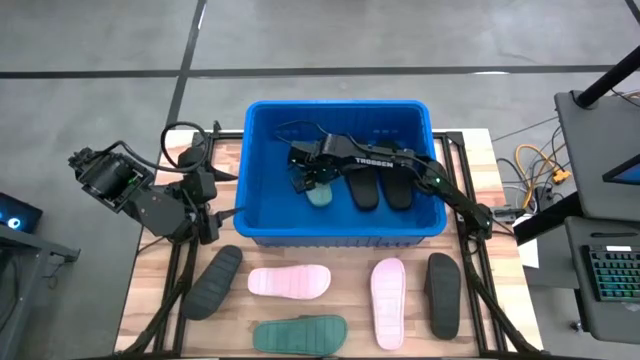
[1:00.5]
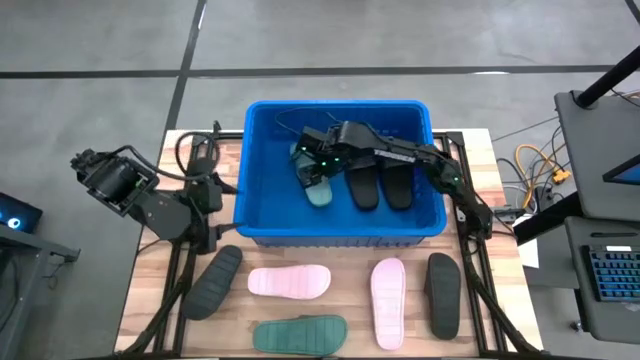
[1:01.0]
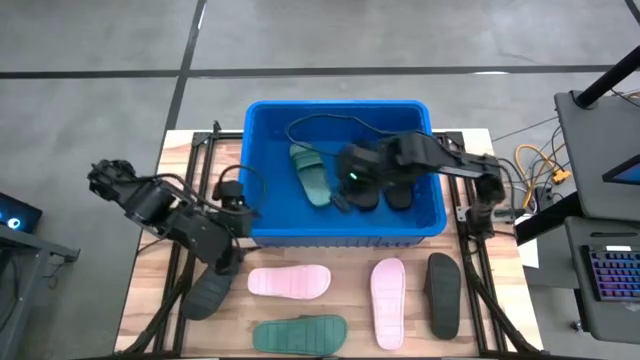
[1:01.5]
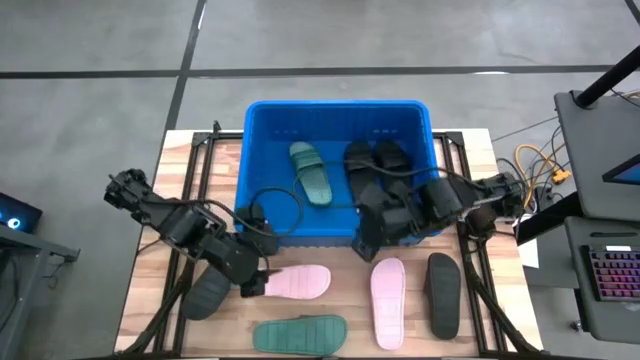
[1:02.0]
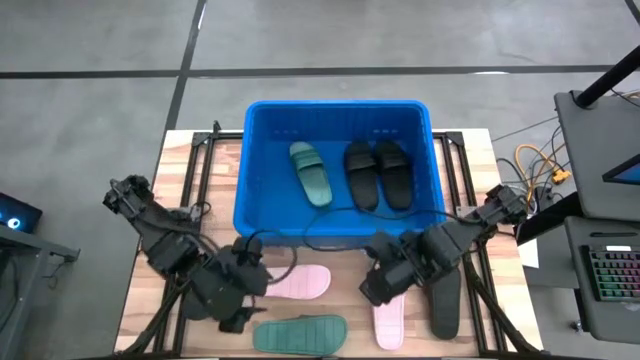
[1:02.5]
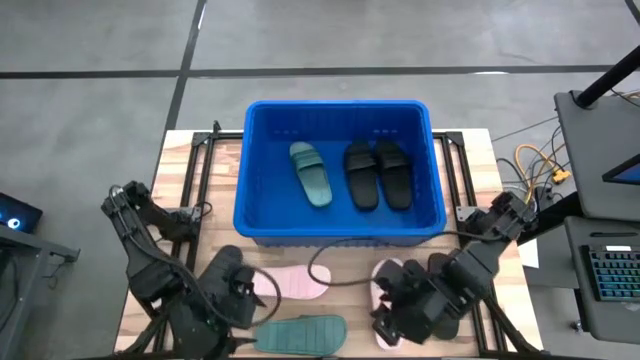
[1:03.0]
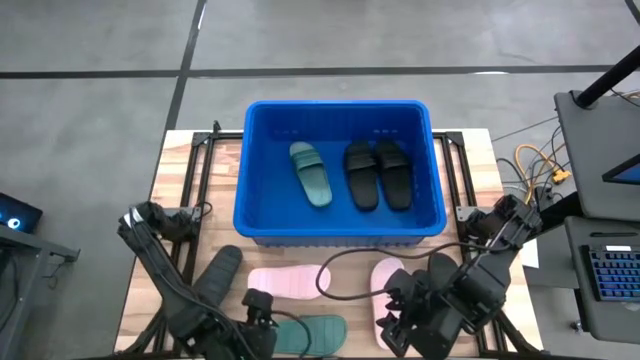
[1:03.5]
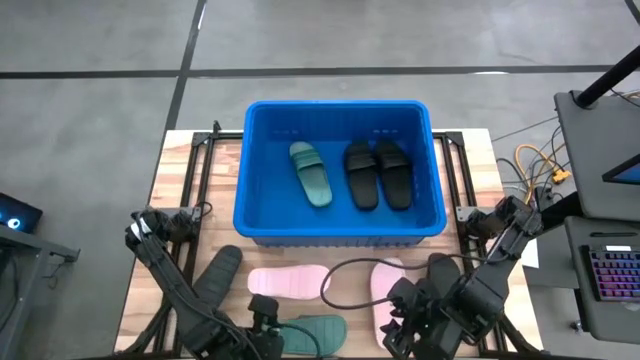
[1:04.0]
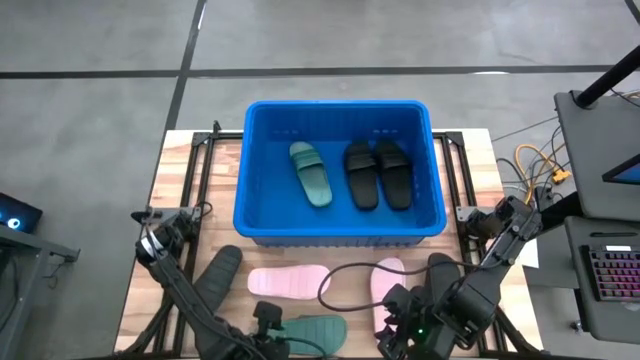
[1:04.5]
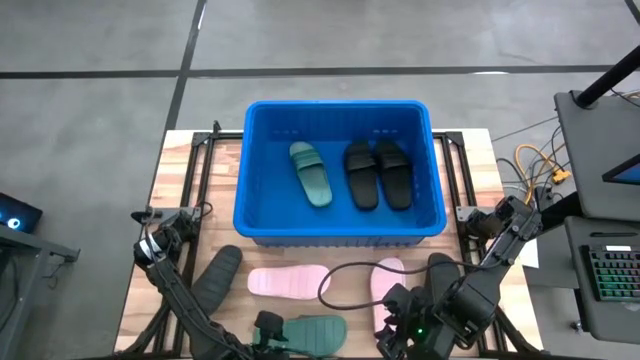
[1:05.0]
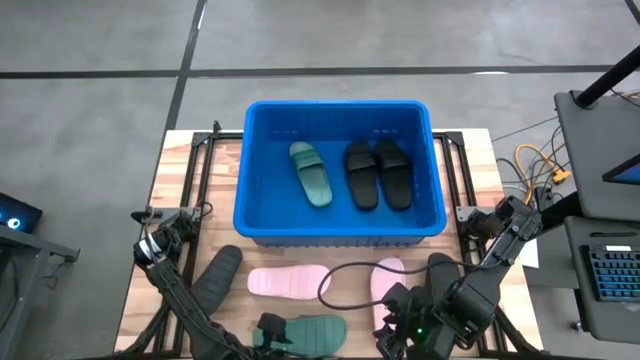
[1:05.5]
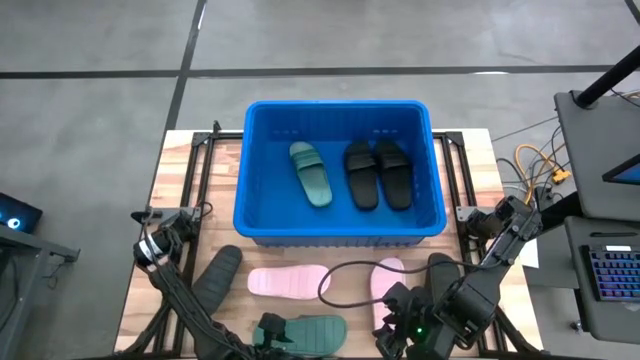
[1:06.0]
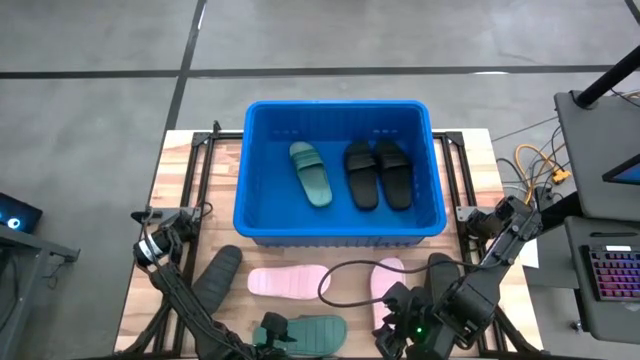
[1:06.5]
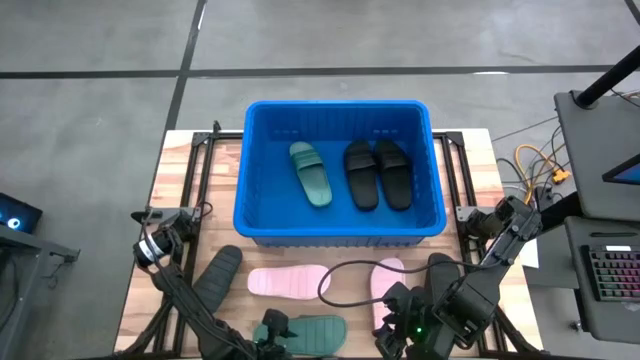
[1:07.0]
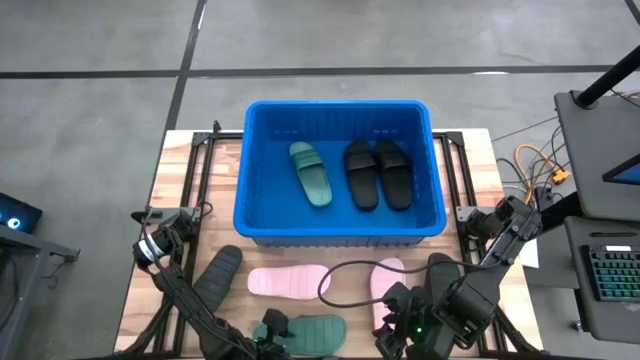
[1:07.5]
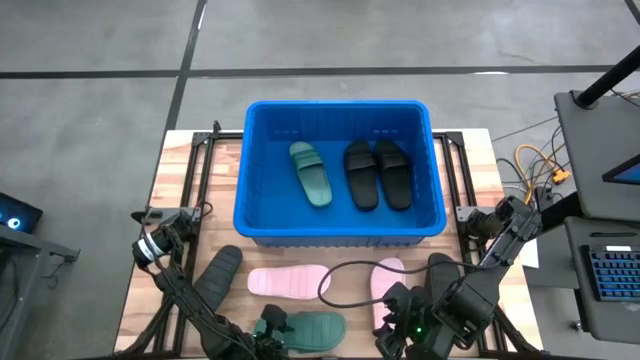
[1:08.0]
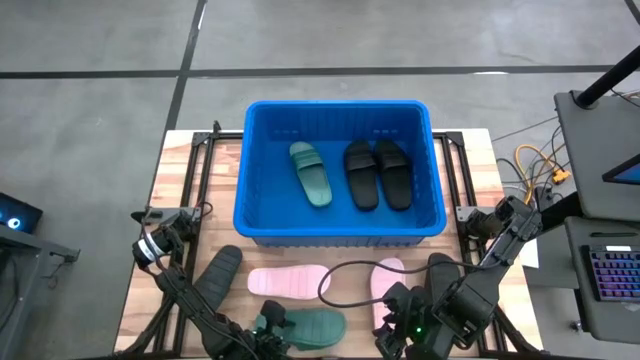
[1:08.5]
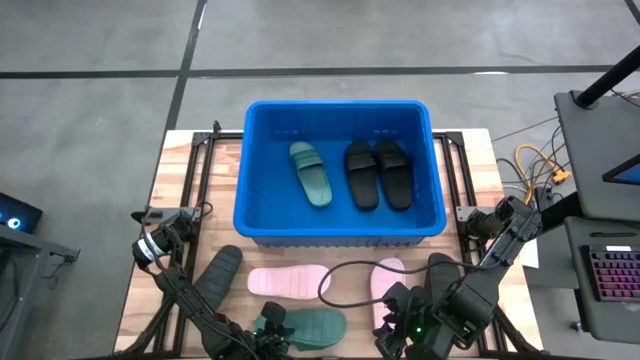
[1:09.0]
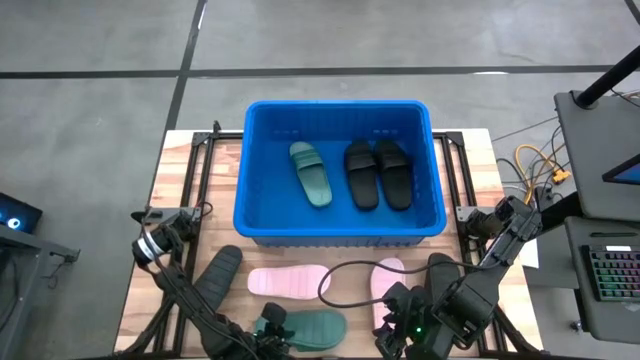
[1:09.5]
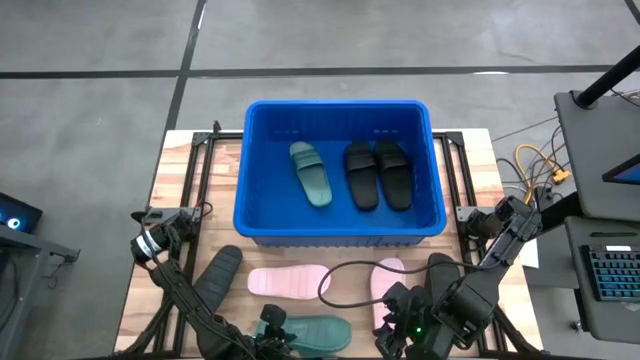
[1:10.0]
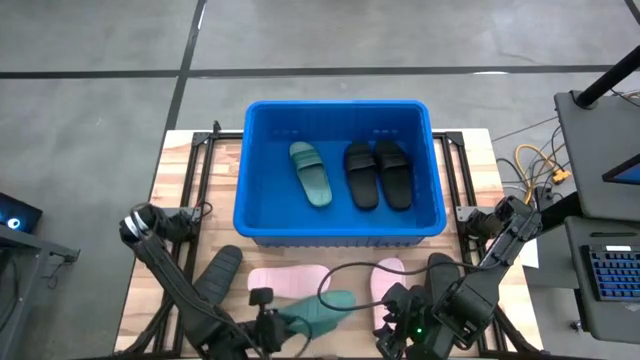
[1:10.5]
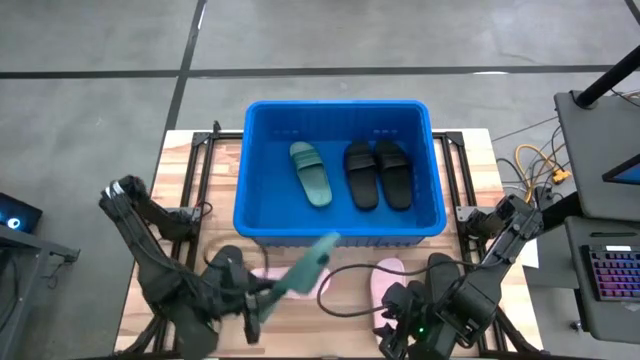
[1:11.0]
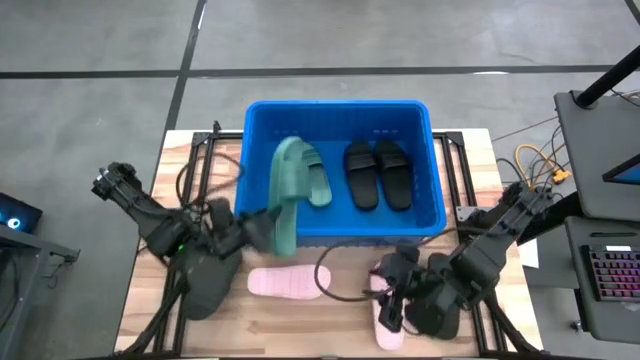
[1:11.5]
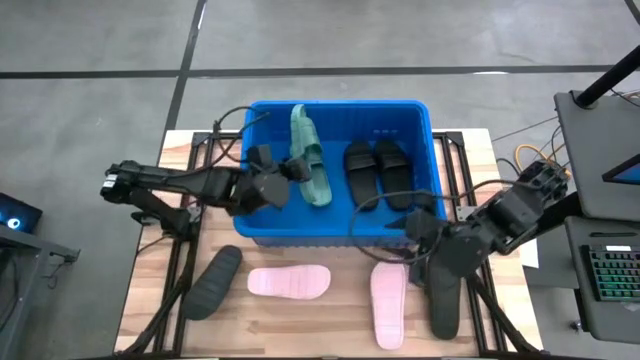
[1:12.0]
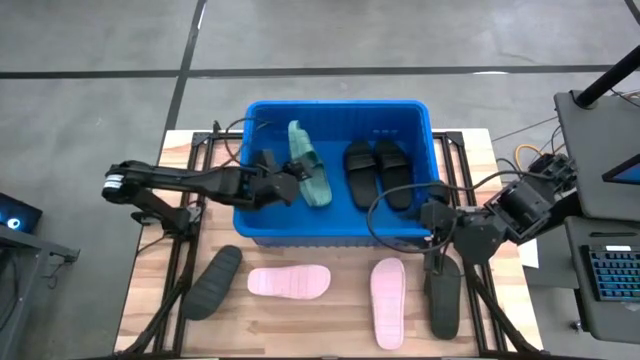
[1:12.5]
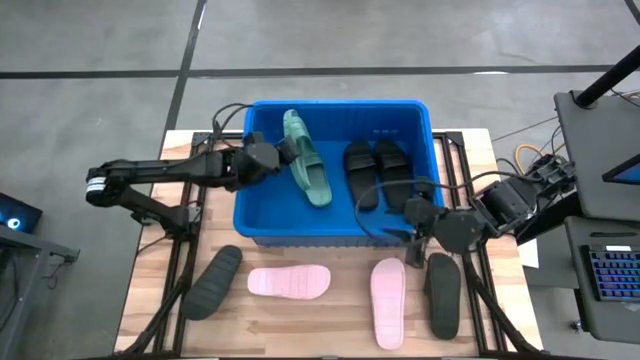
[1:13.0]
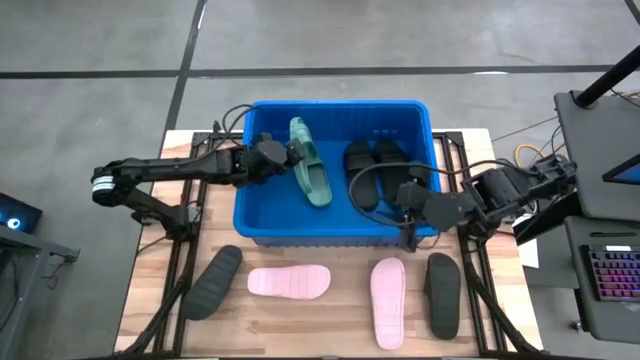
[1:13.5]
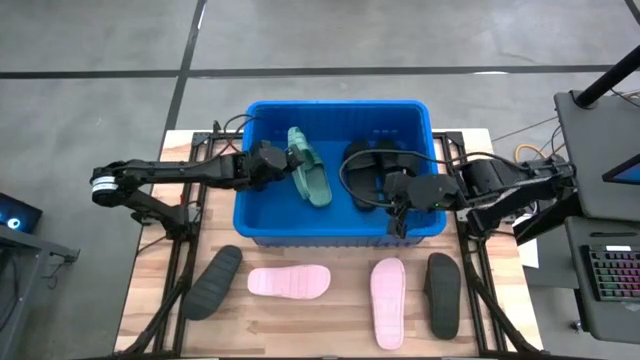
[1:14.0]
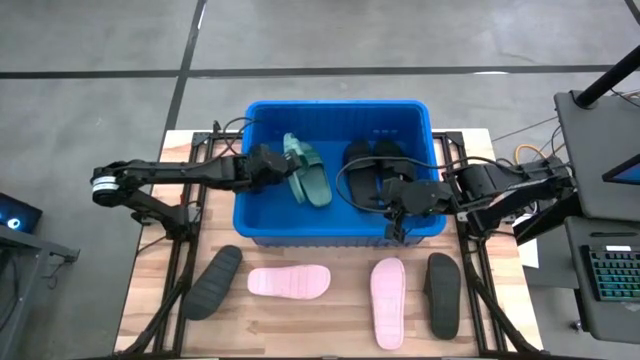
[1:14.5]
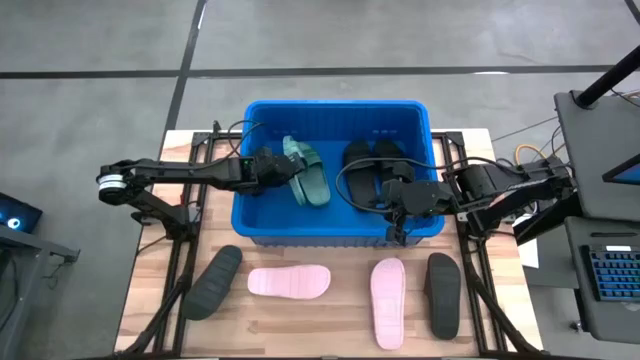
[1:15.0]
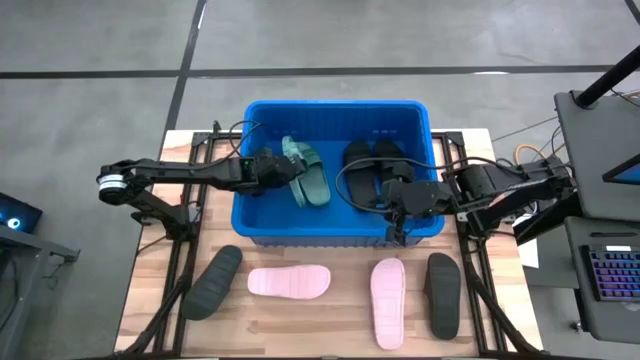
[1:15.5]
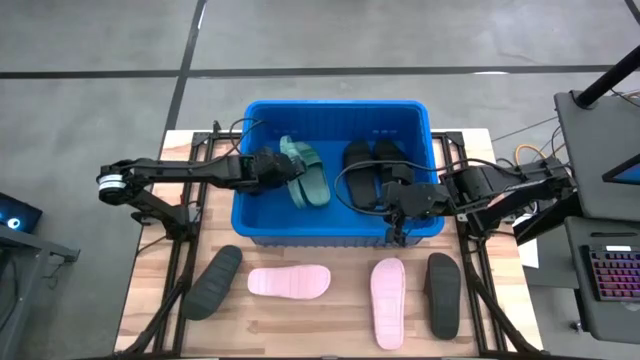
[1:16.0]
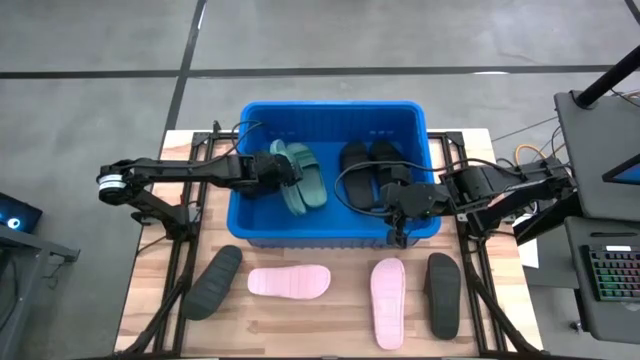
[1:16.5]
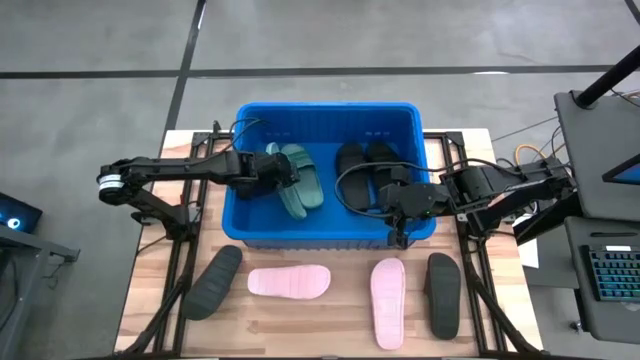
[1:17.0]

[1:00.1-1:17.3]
Task: Pick and place slides into bin
Put the green slide into the bin

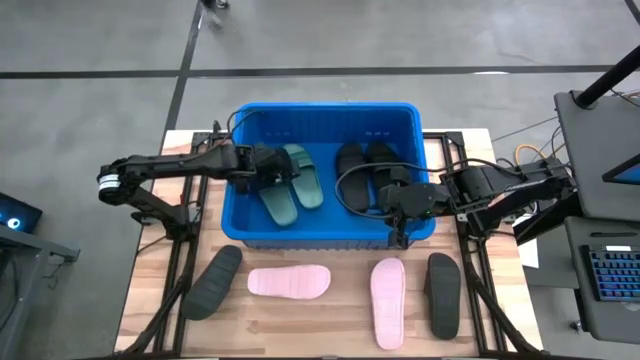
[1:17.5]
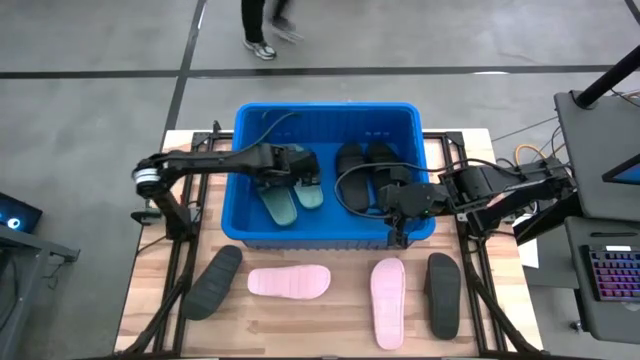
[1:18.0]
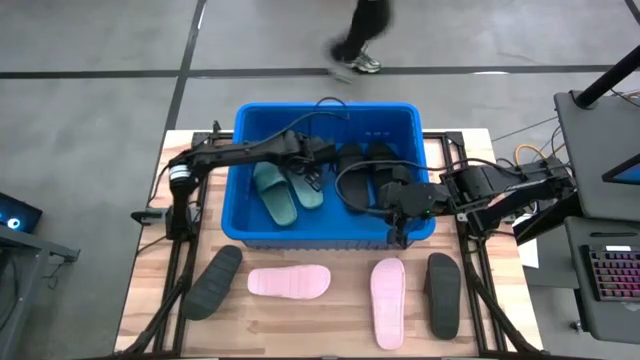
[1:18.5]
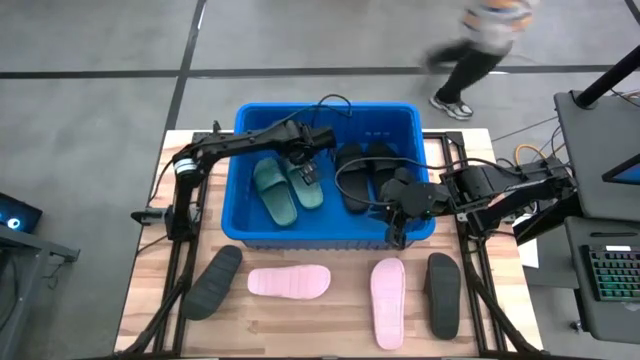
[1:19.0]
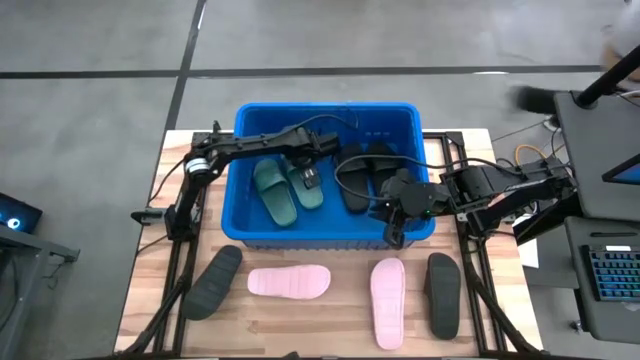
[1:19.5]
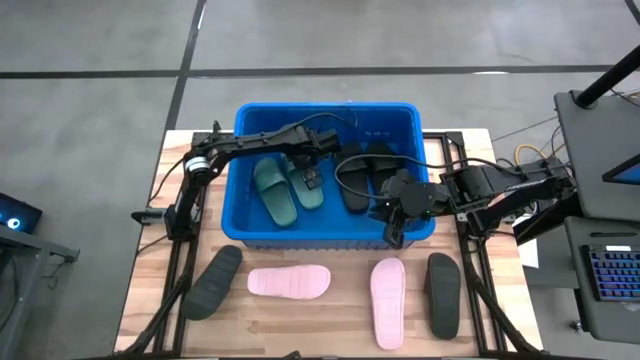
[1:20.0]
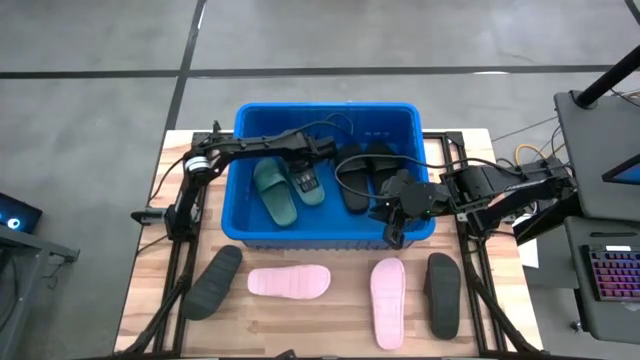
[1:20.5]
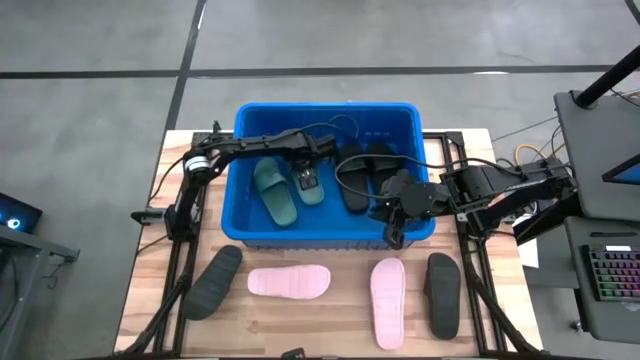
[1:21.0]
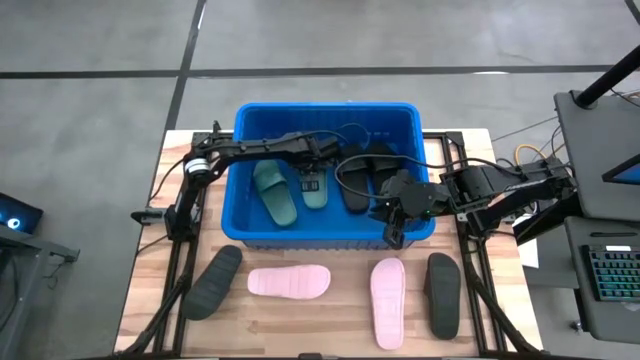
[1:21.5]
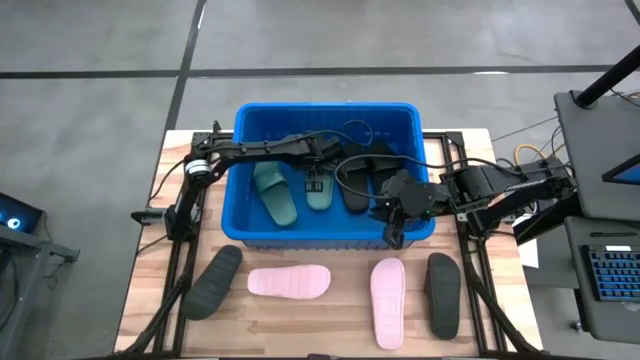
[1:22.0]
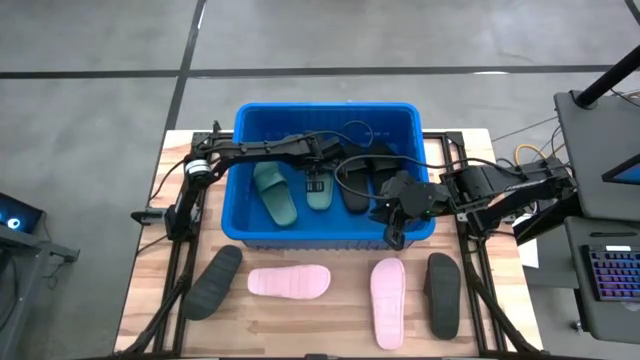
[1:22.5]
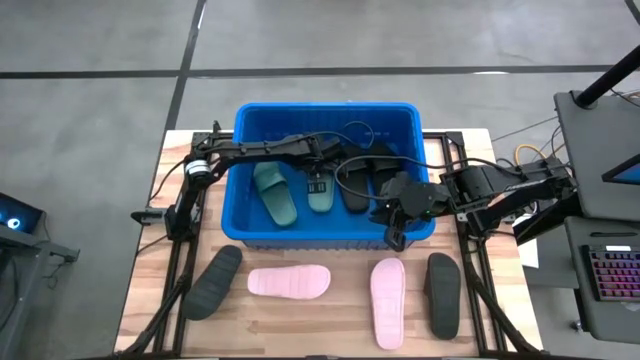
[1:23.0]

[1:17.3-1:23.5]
Adjust the green slide in the bin
